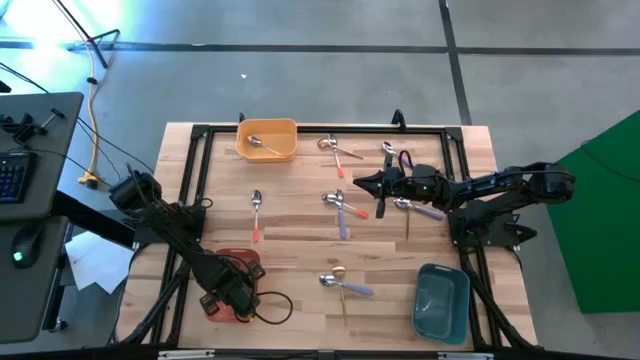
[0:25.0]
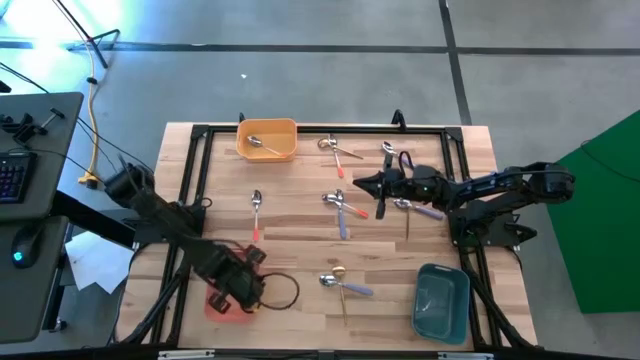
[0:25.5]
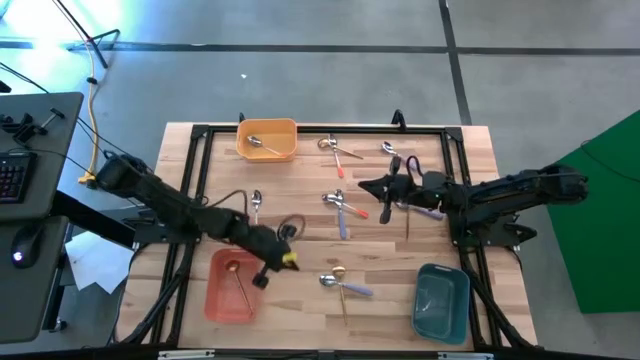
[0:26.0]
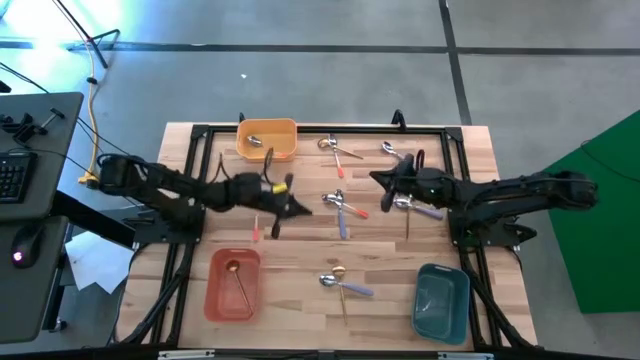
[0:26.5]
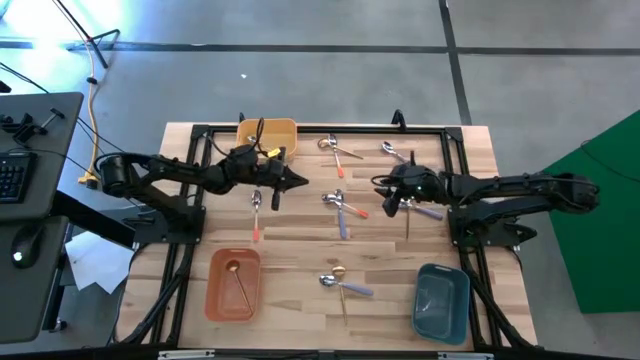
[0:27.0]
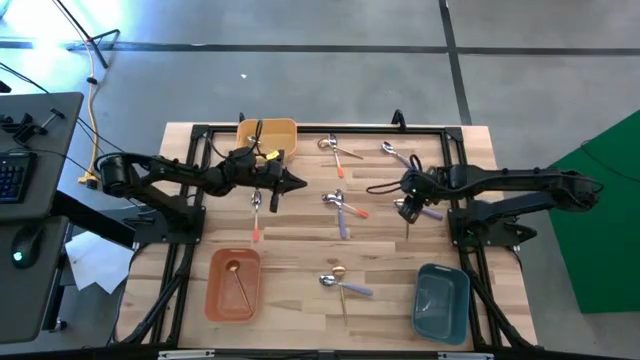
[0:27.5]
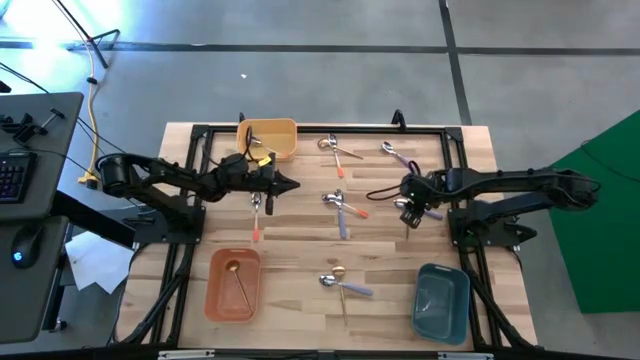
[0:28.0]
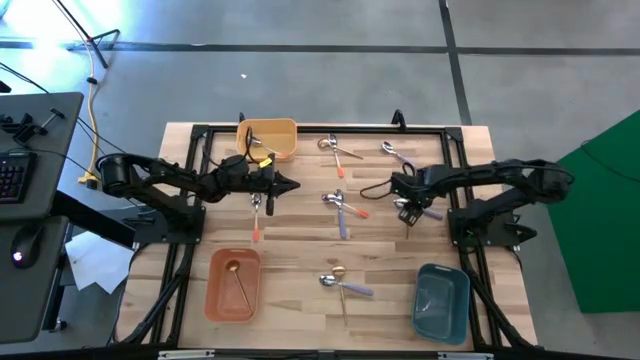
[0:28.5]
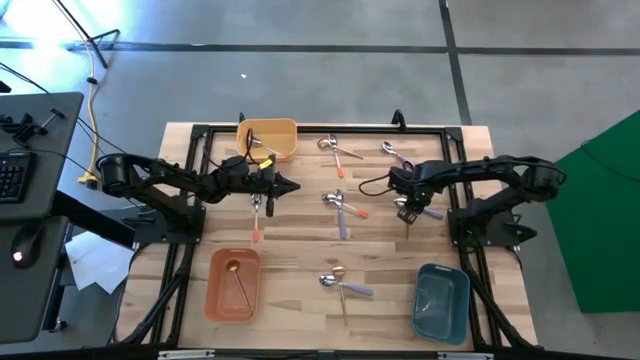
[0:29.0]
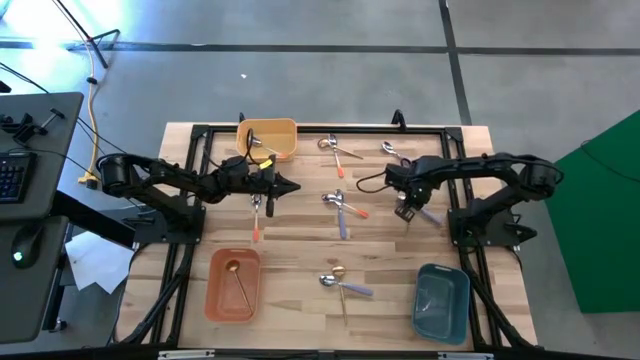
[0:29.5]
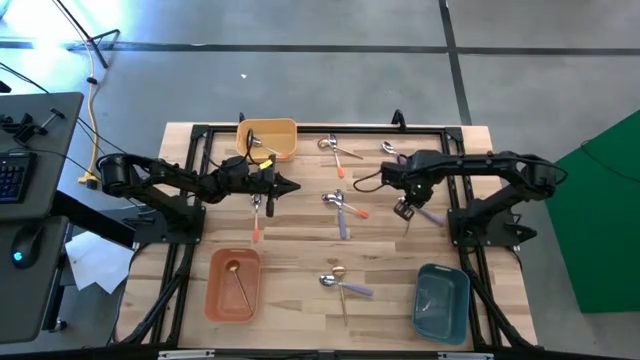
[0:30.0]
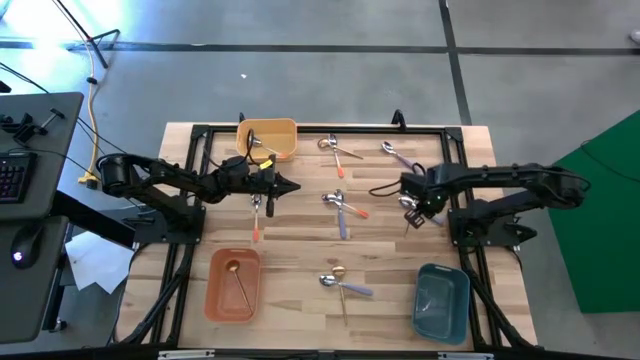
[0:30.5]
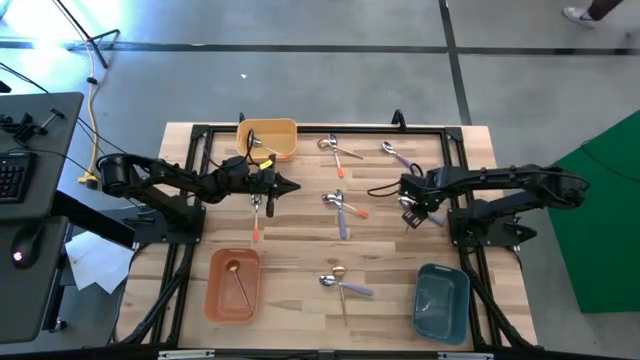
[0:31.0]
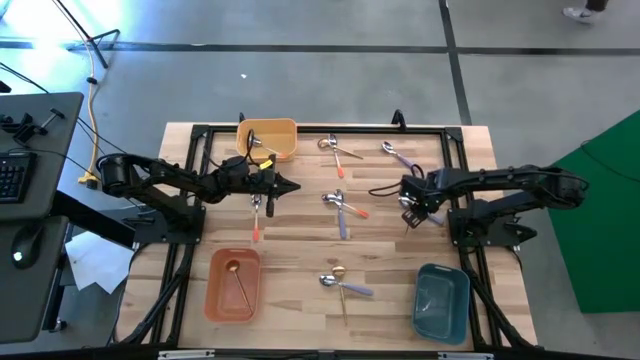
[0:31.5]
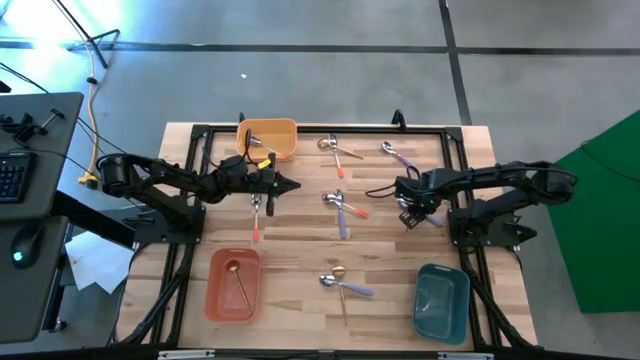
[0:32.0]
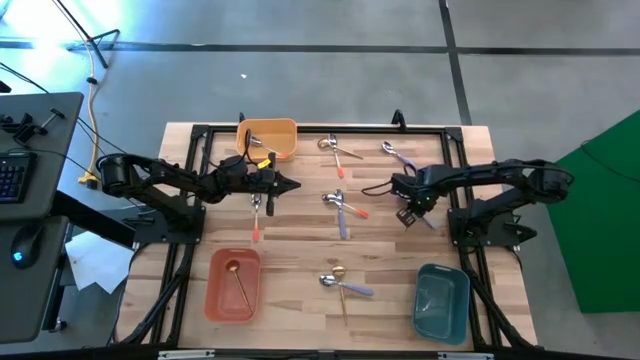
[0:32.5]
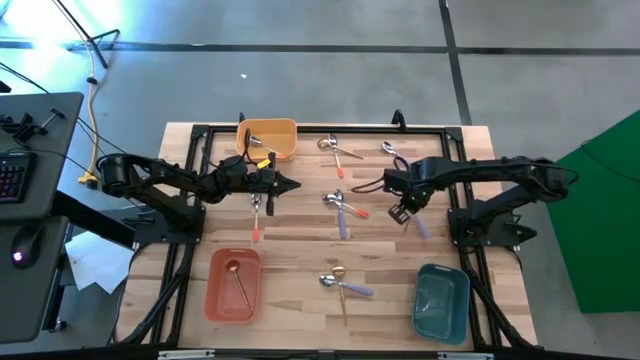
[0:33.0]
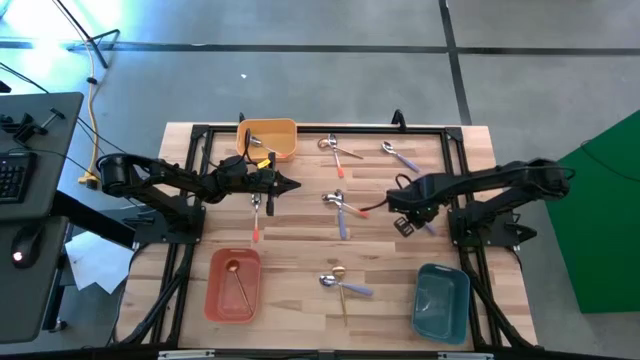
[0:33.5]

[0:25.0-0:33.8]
Task: Sort silverware by color (type)
Put the middle right violet spoon into the blue bin

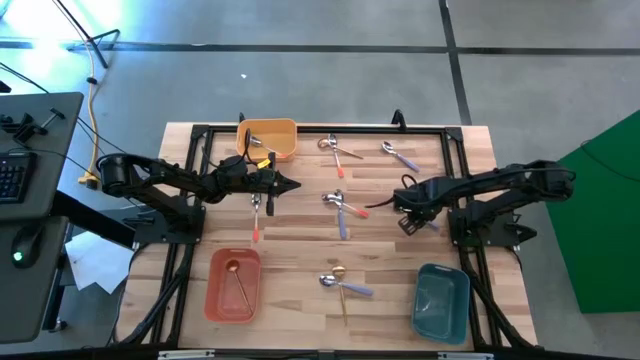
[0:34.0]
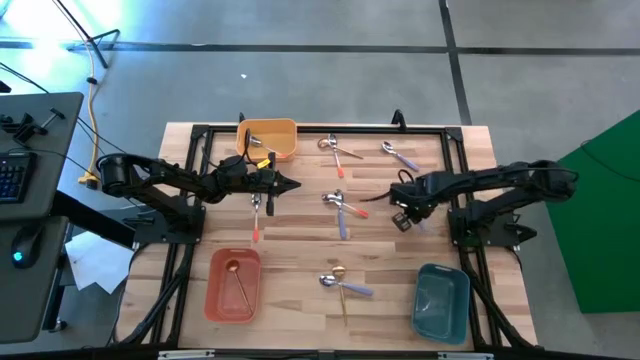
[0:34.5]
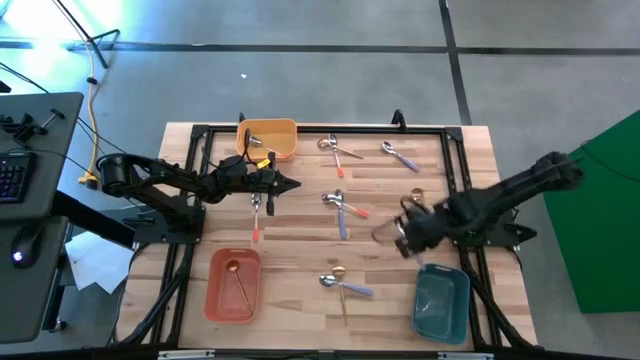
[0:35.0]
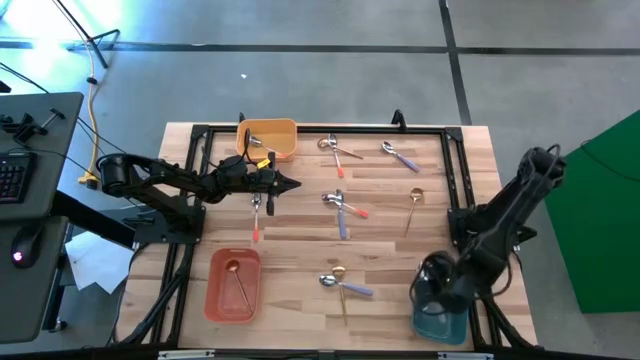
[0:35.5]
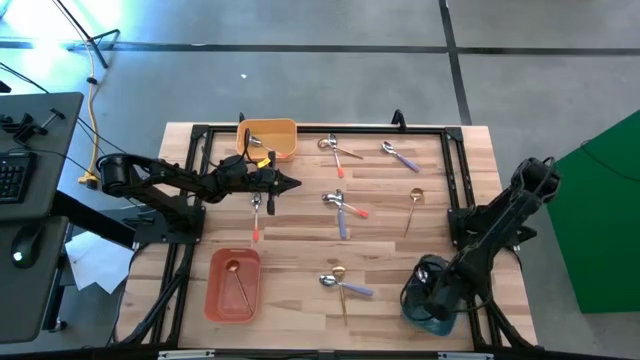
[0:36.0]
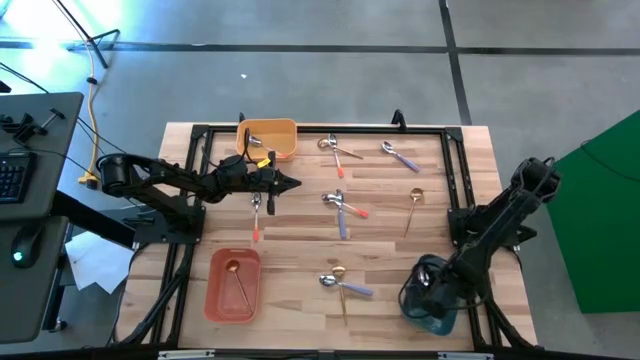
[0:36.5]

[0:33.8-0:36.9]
Put the middle right violet spoon into the blue bin

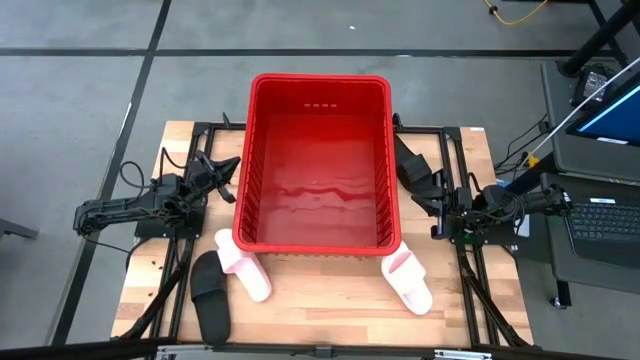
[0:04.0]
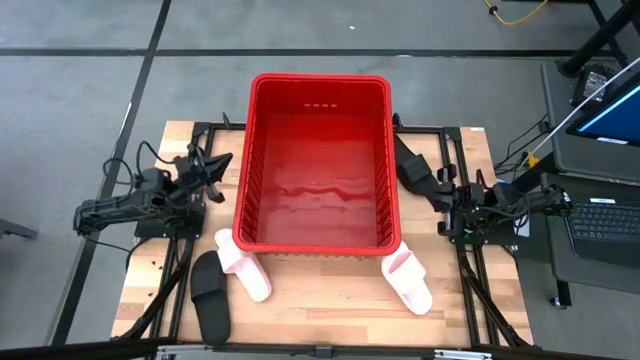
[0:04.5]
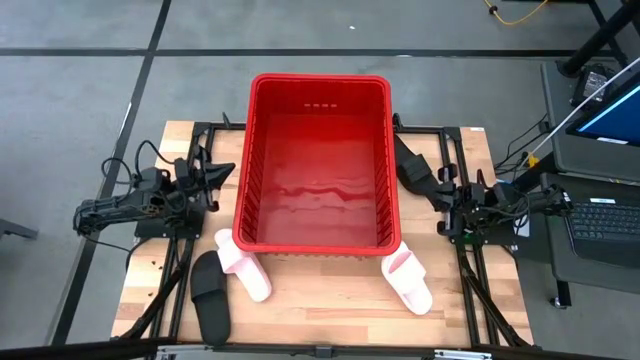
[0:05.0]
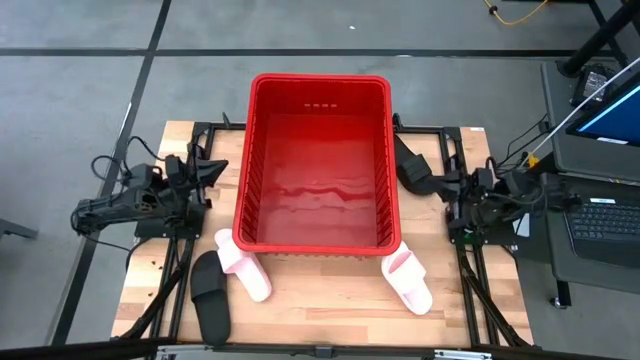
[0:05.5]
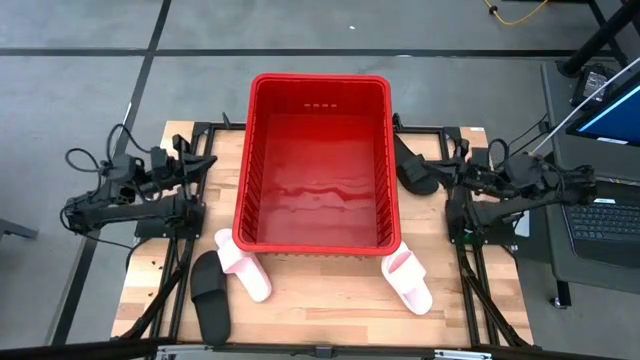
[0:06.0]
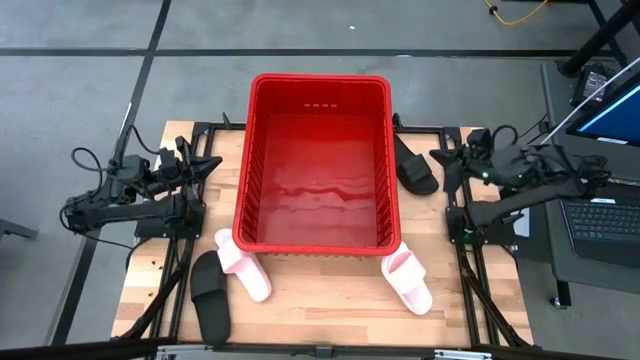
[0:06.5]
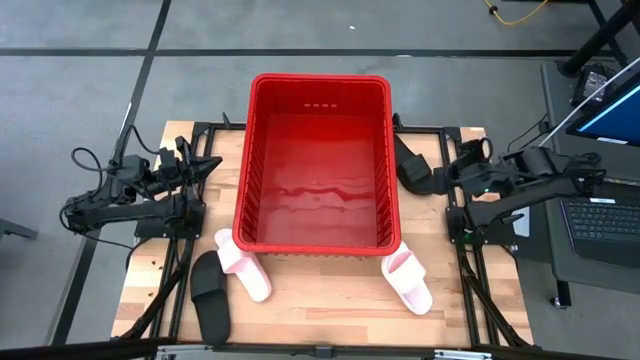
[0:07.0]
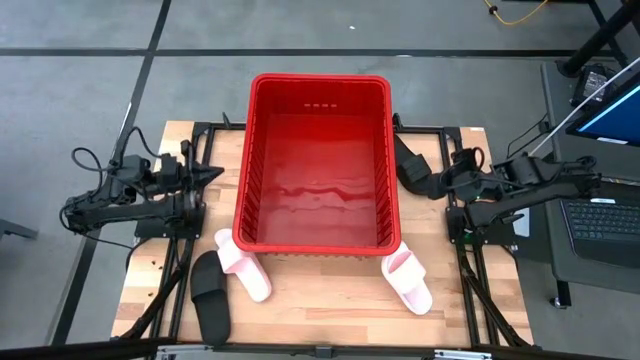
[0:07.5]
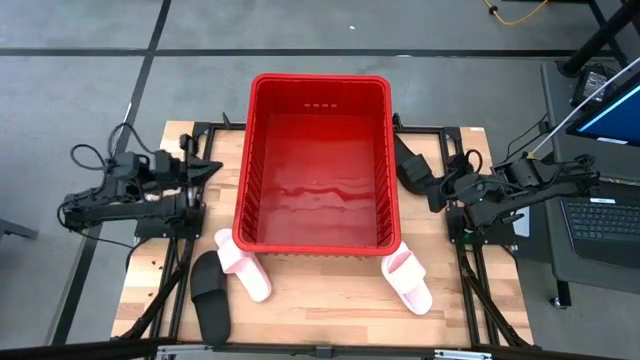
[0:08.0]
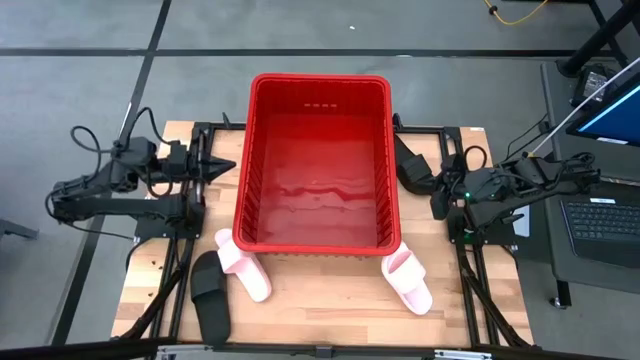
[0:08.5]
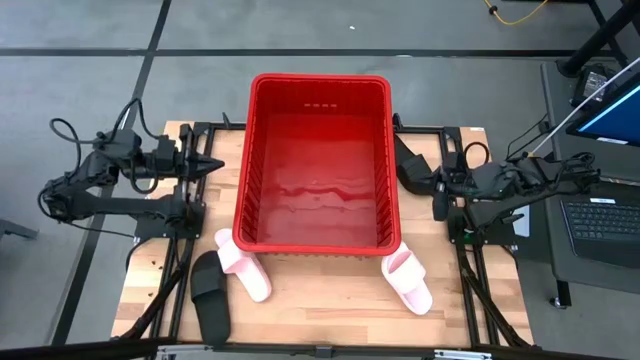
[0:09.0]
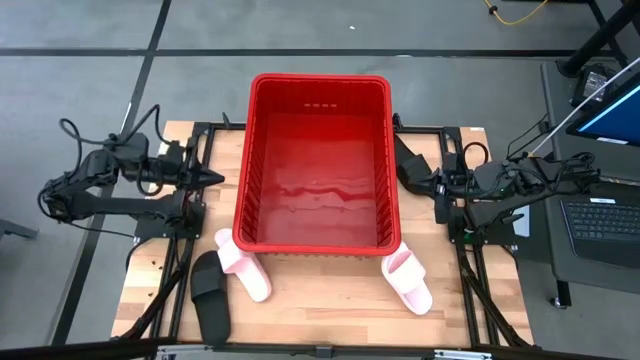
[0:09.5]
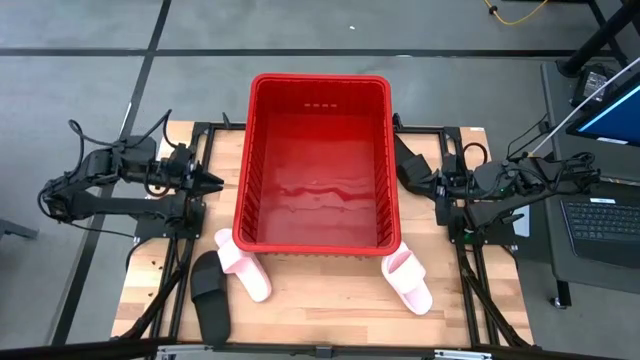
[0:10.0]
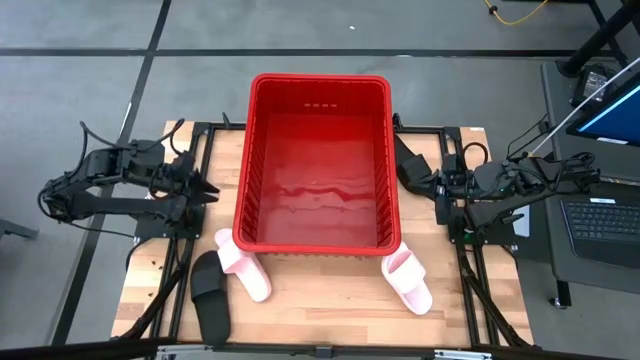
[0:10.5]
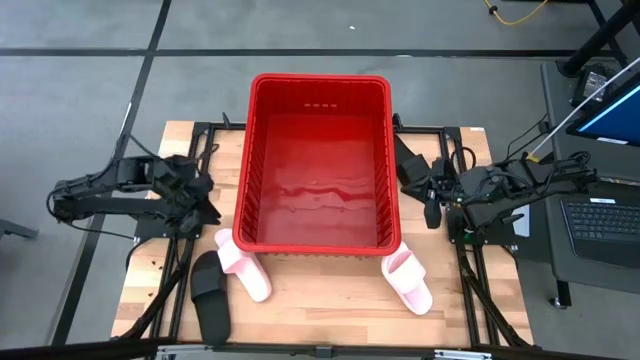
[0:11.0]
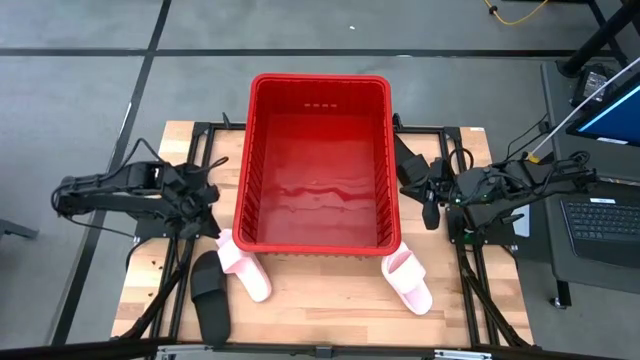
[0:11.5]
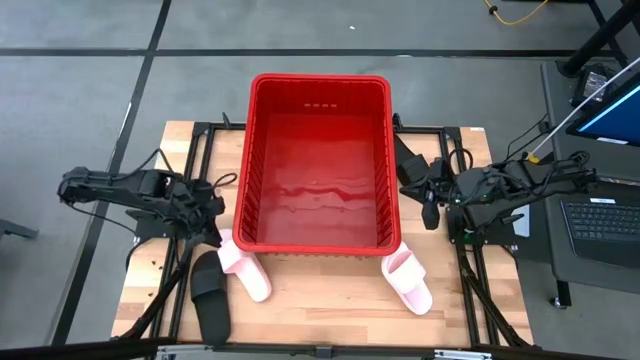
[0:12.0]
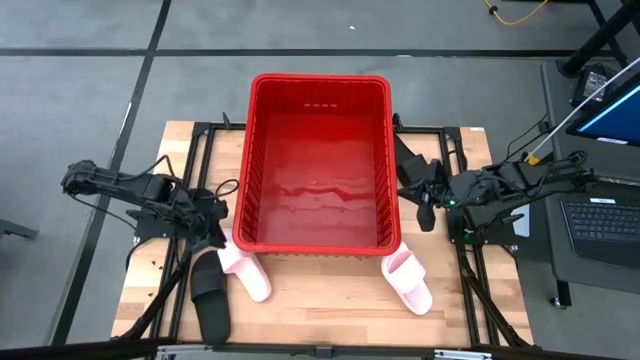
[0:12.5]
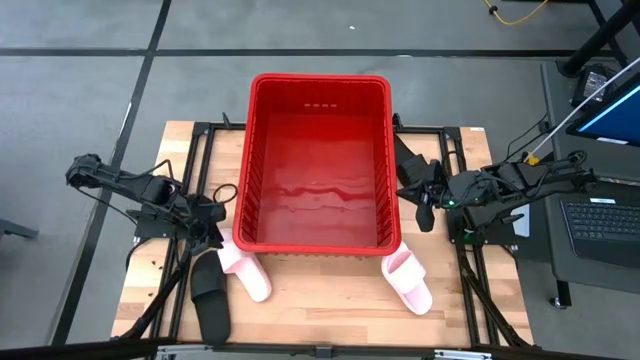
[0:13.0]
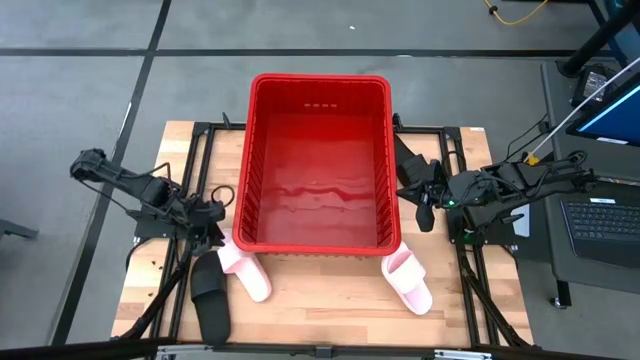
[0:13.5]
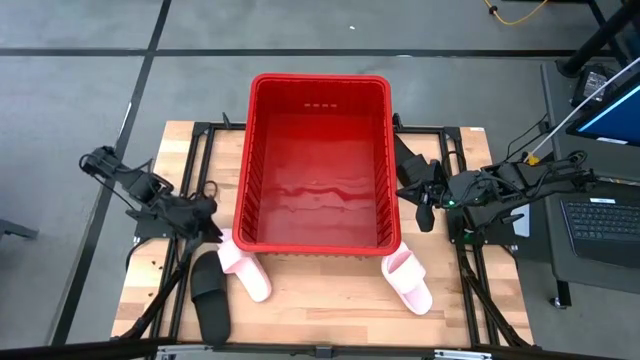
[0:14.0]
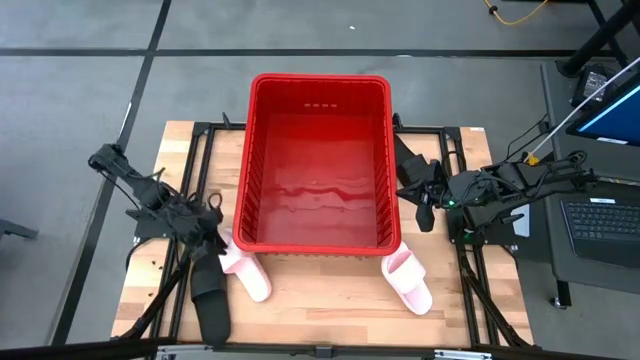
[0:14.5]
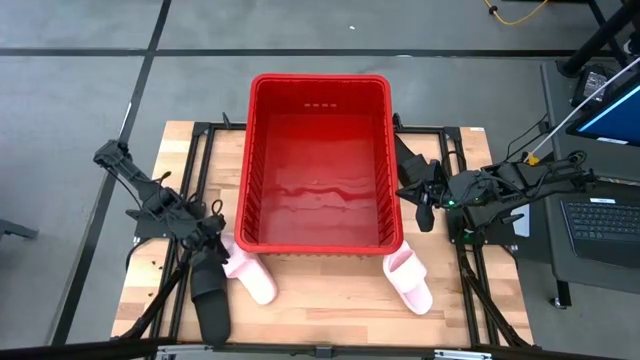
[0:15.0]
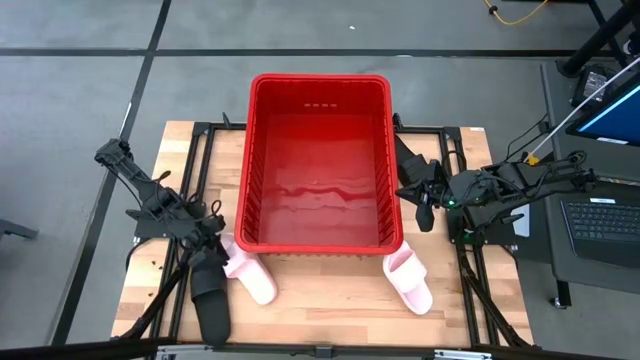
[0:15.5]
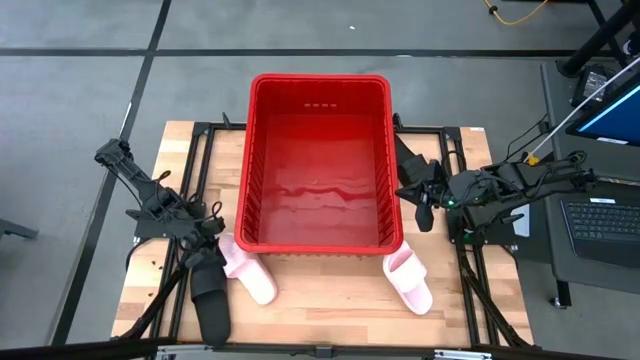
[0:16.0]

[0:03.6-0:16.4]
Task: Pick and place slides into bin
Put the left pink slide into the bin
